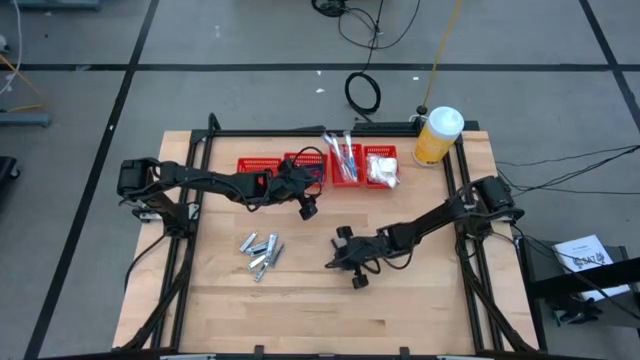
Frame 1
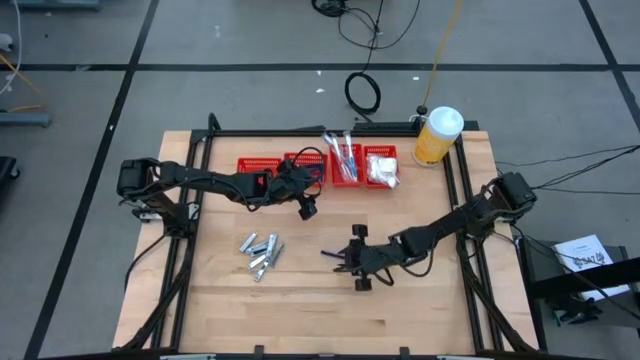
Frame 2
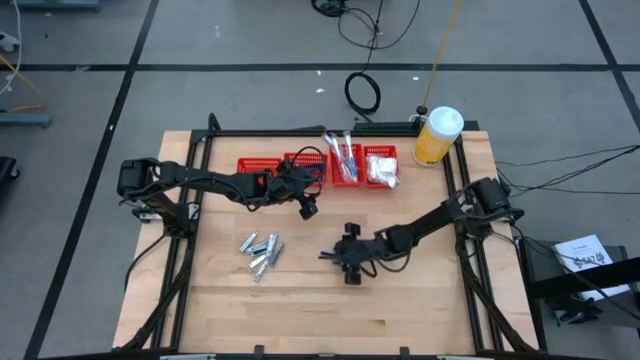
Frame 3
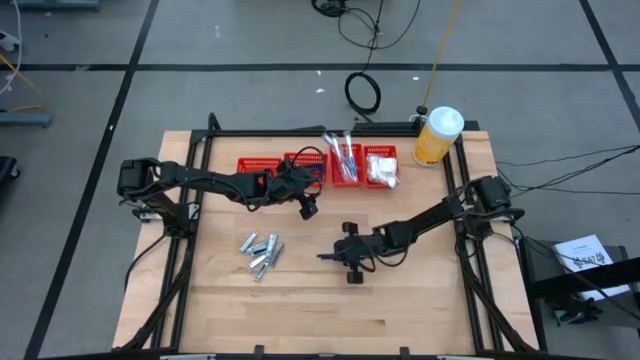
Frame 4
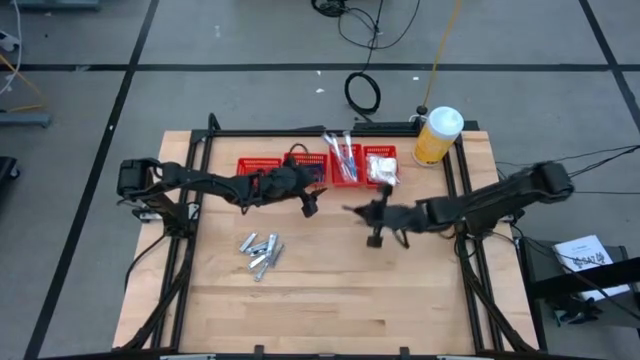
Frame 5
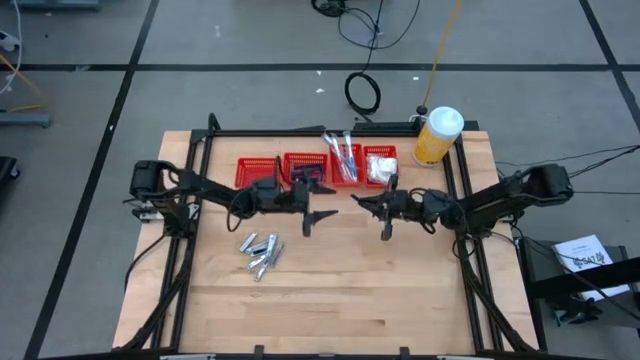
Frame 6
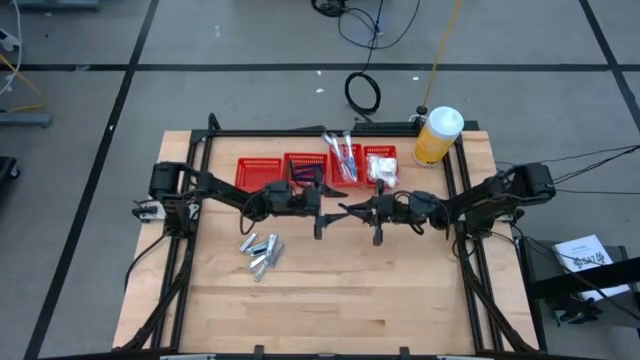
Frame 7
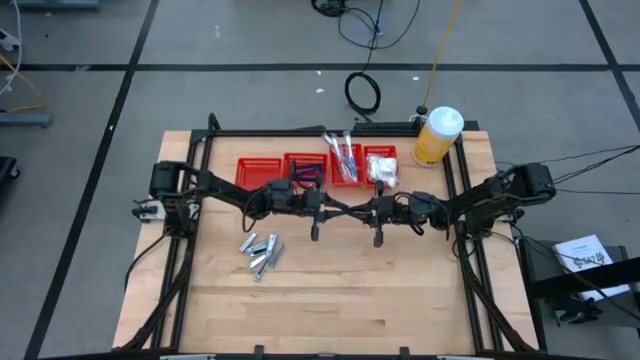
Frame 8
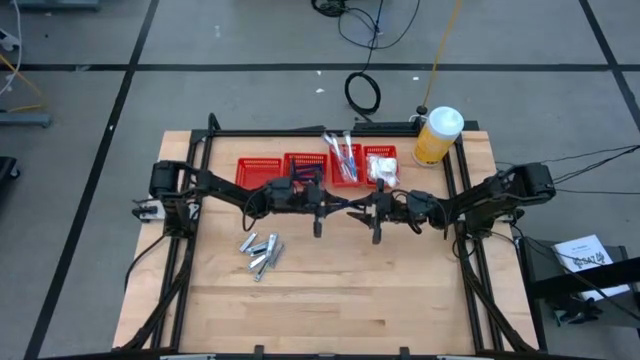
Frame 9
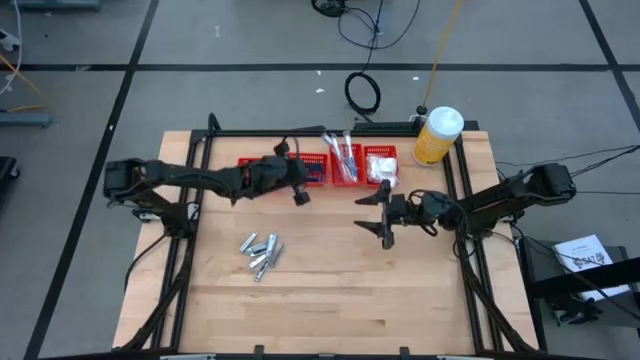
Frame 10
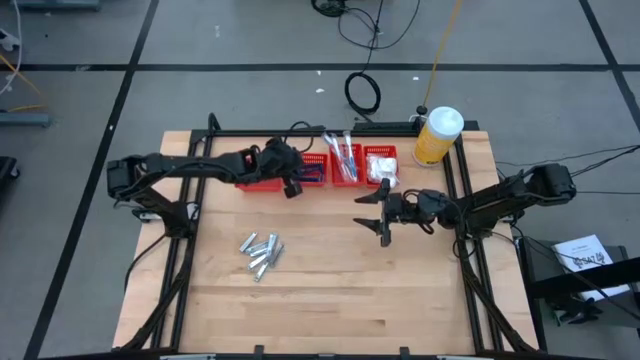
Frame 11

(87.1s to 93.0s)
Task: Pick & Place Travel size toiletries
Put the razor into the horizontal right red bin

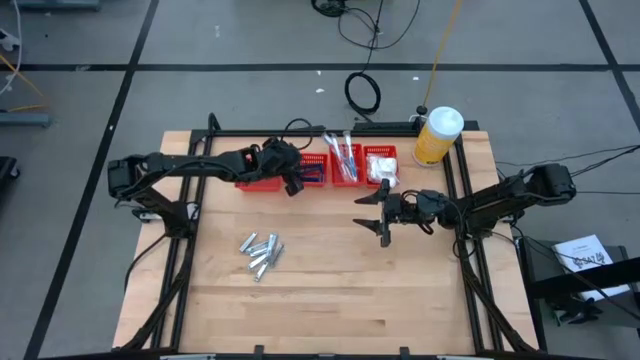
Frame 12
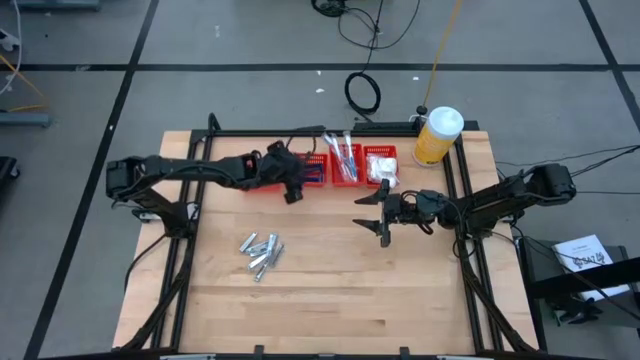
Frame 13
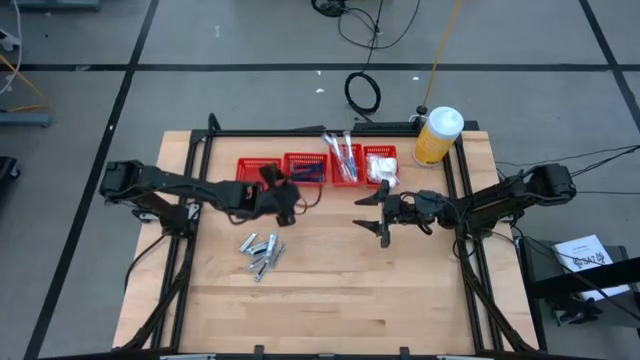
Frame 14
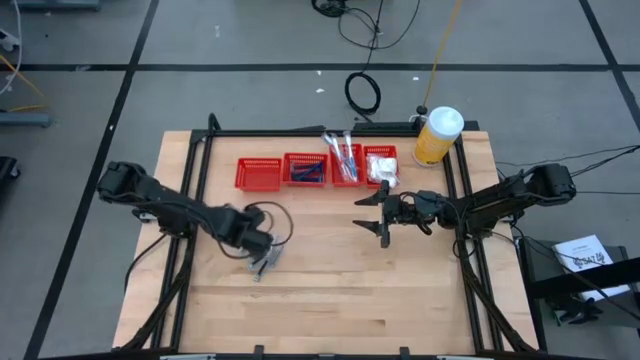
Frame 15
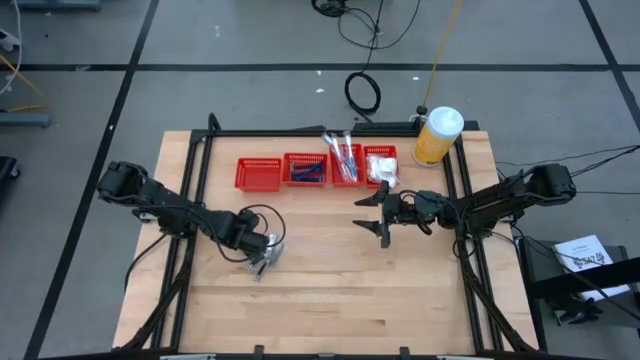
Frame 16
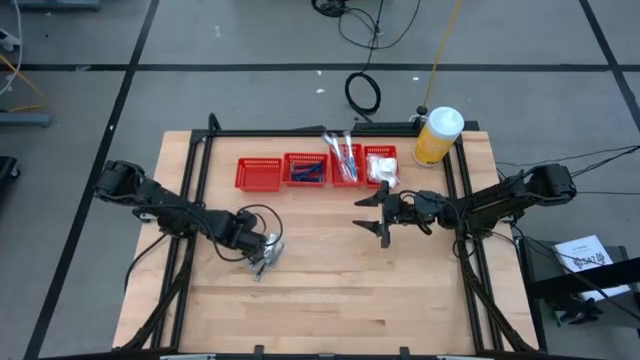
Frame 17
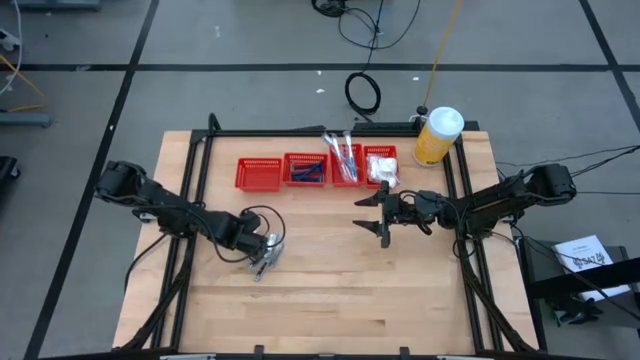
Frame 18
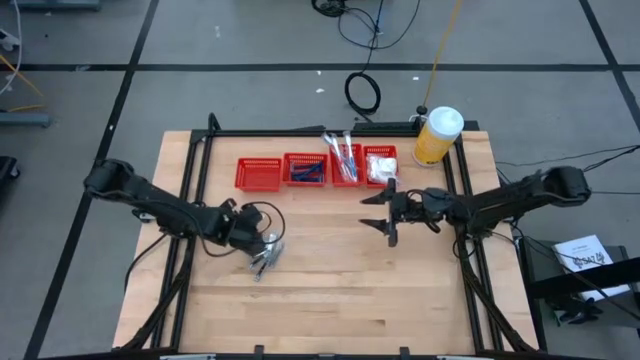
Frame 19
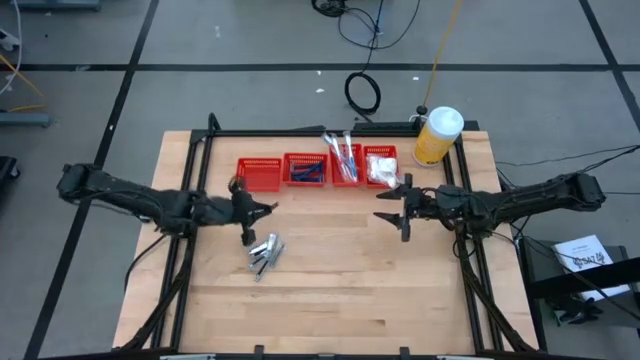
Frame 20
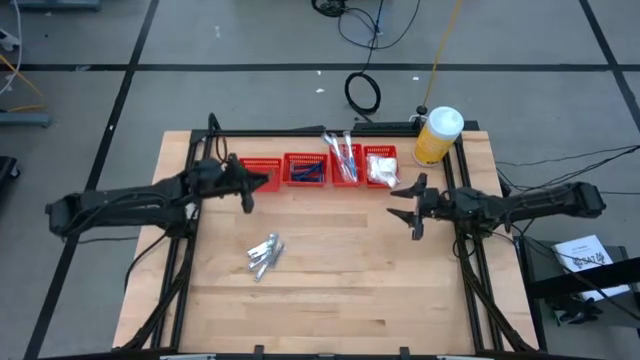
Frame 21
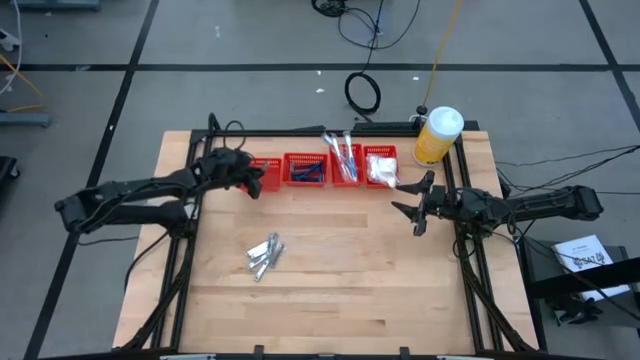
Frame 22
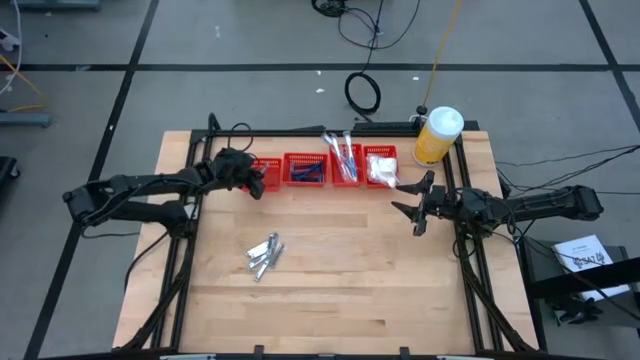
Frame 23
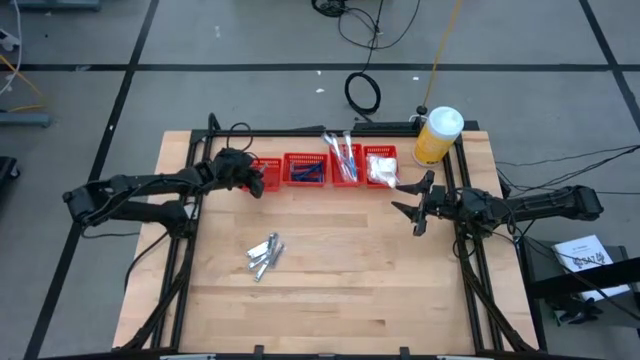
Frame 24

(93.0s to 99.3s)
Put the nail cutter into the horizontal left red bin

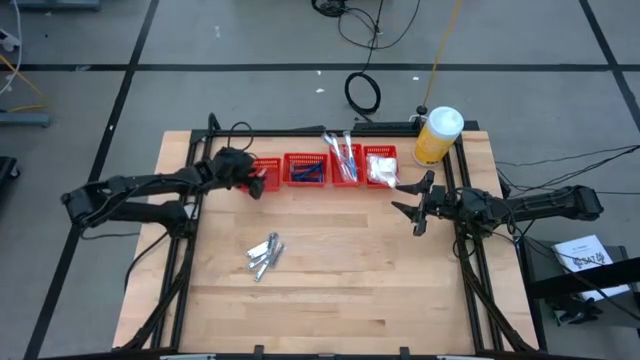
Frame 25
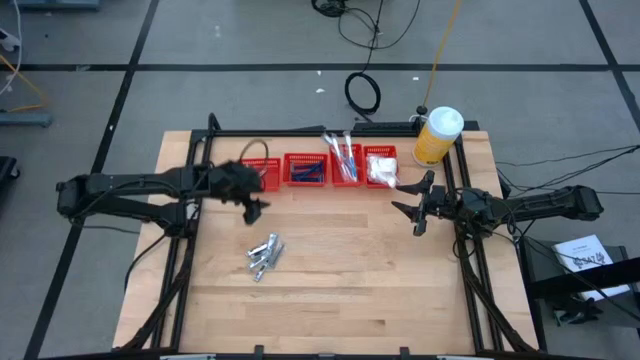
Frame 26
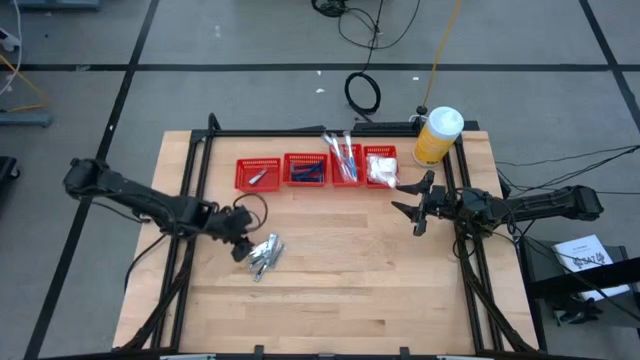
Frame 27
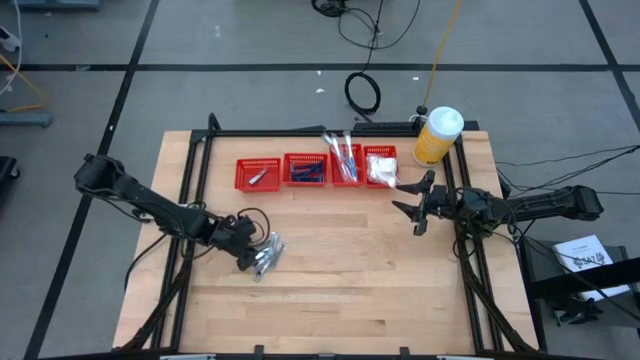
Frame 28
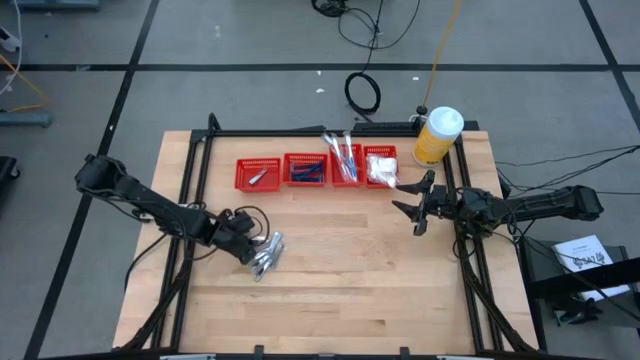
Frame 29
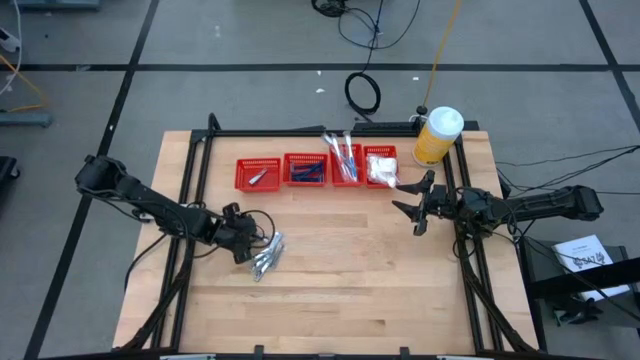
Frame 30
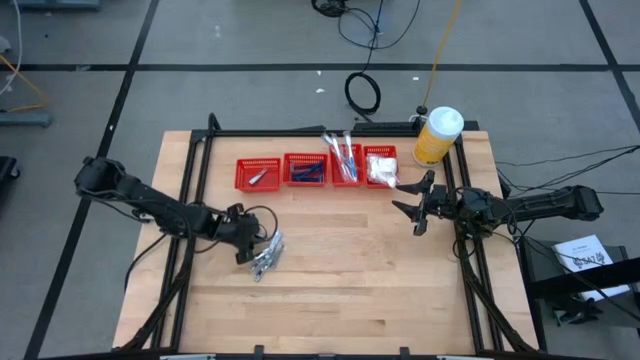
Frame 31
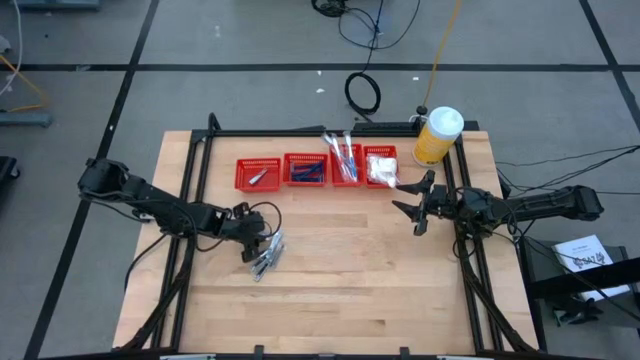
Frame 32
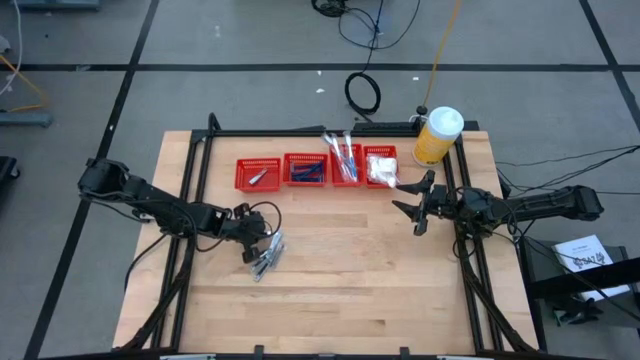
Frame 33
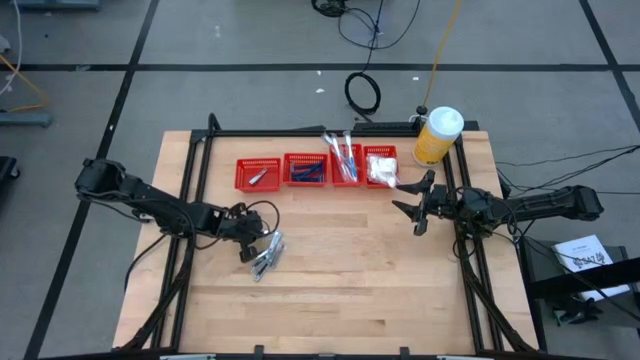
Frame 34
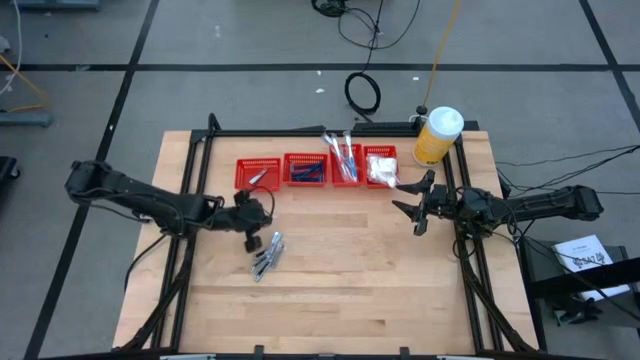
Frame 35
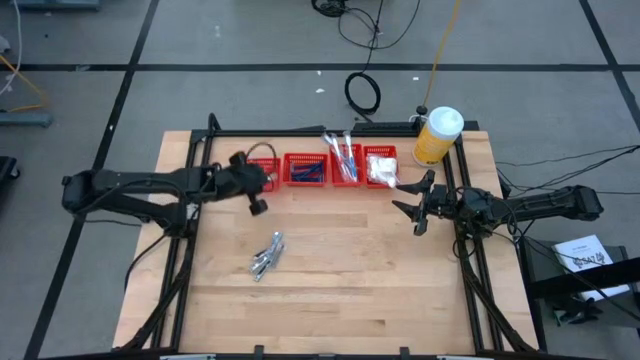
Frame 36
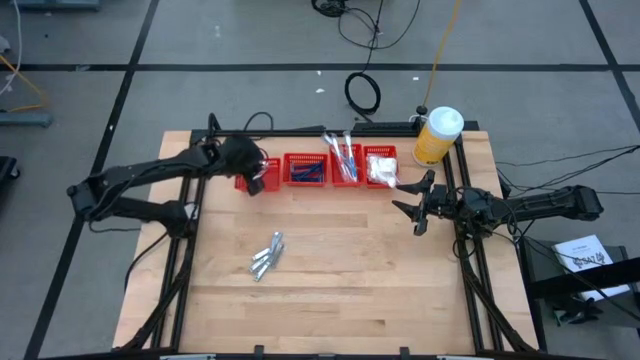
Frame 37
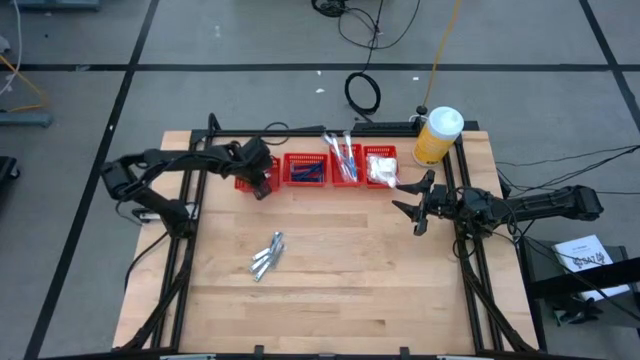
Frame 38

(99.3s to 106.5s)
Put the nail cutter into the horizontal left red bin

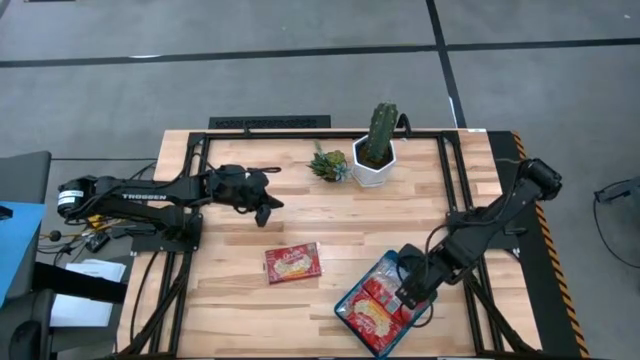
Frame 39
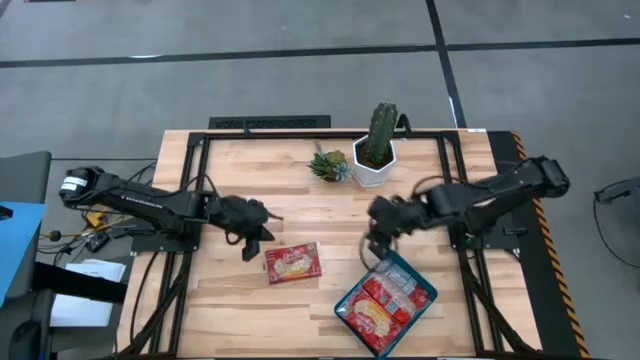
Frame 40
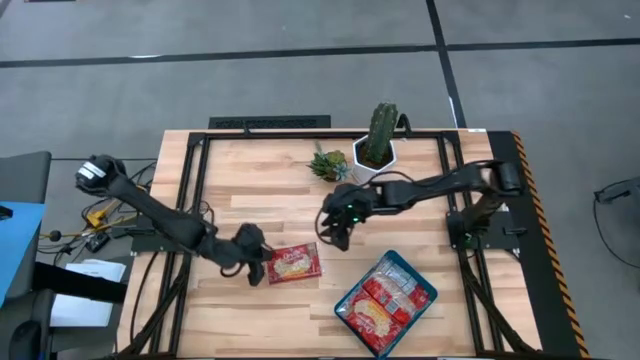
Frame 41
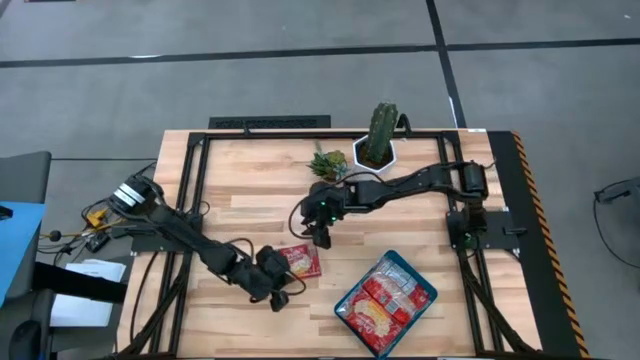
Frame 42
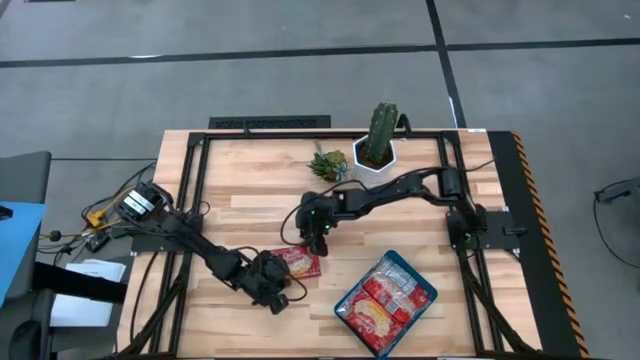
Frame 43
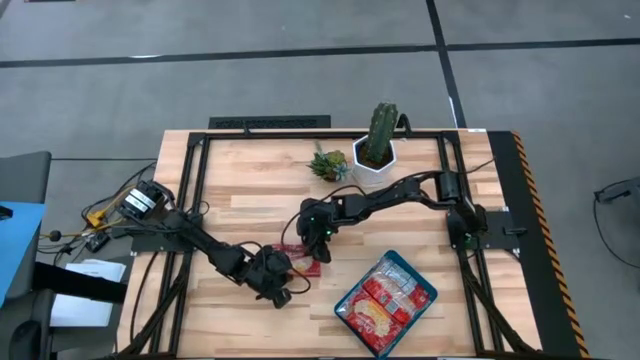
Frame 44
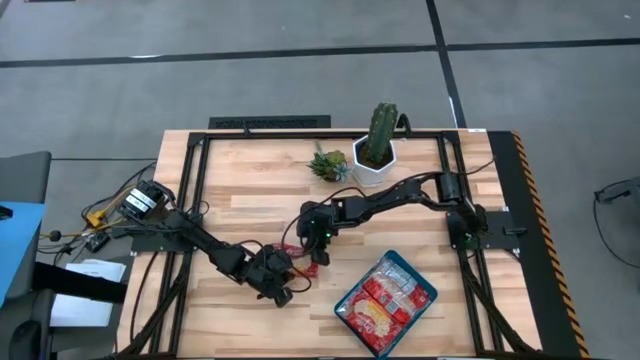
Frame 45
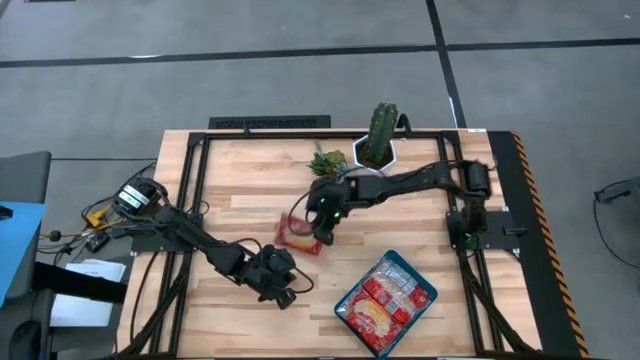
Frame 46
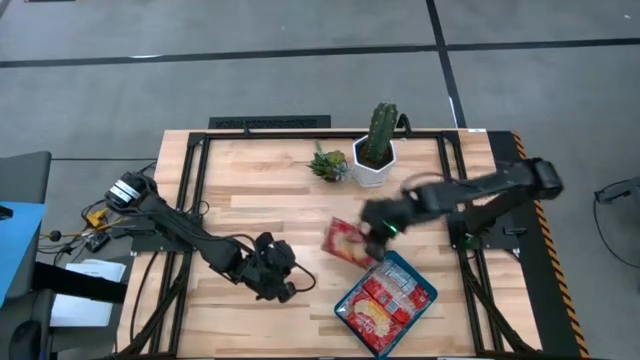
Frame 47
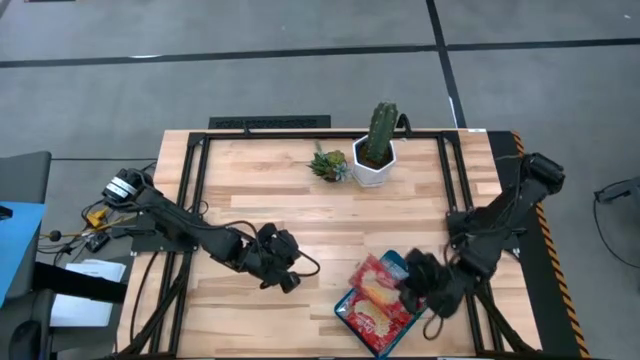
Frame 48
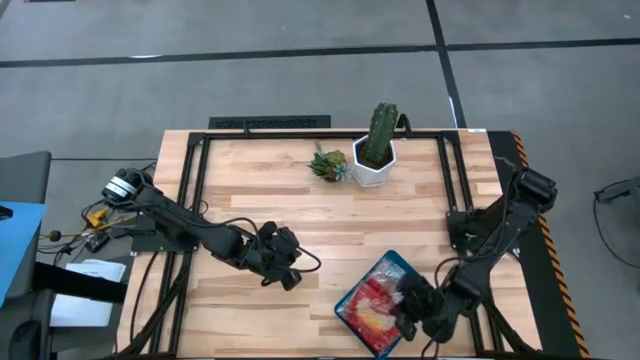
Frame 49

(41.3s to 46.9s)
Task: Sort popcorn bags into baskets
Put the popcorn bag into the bin
